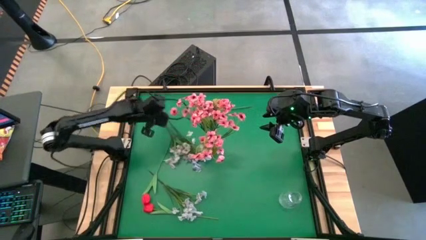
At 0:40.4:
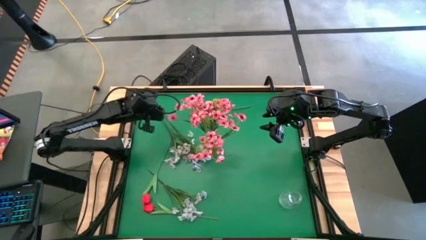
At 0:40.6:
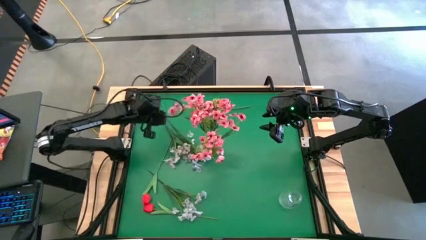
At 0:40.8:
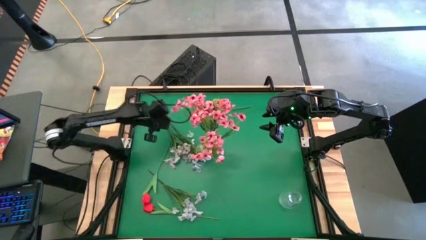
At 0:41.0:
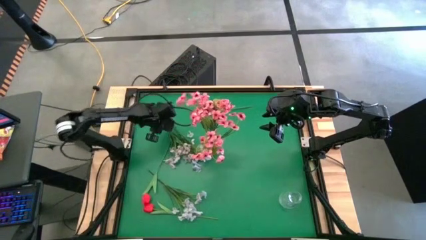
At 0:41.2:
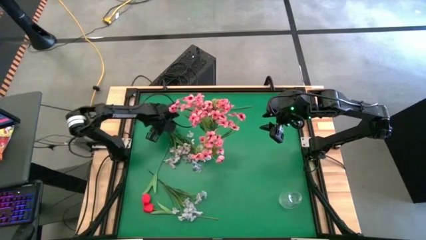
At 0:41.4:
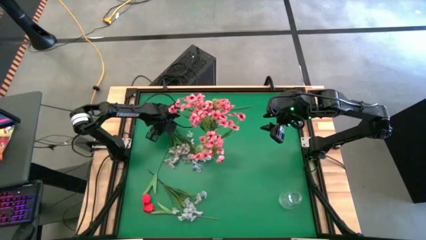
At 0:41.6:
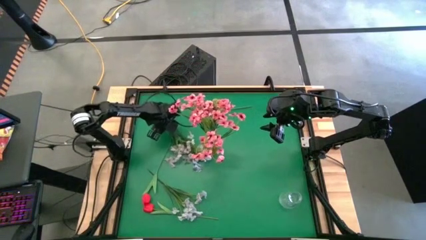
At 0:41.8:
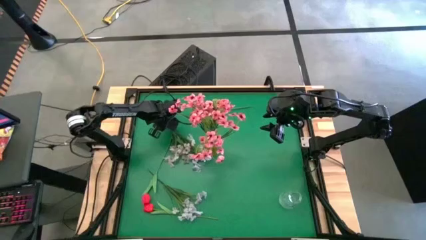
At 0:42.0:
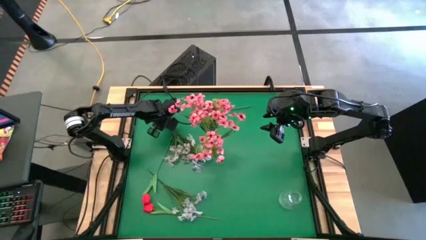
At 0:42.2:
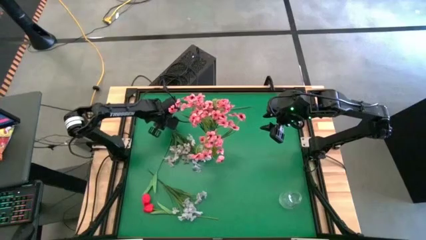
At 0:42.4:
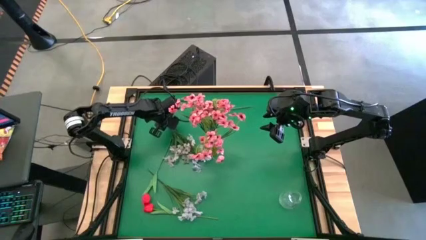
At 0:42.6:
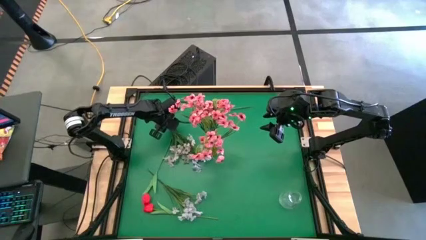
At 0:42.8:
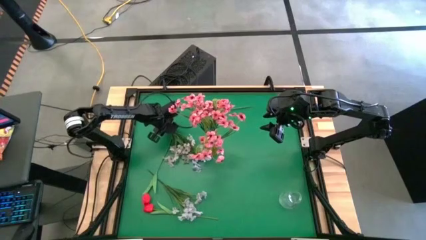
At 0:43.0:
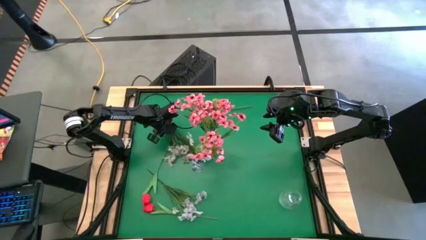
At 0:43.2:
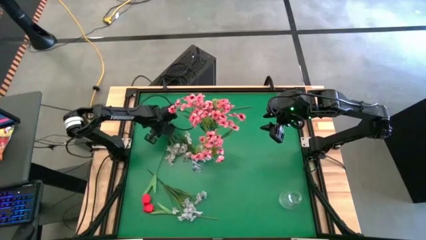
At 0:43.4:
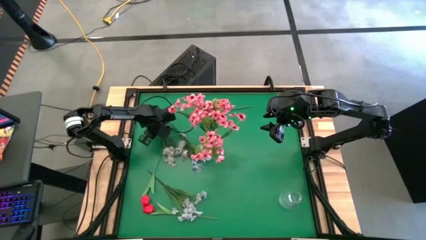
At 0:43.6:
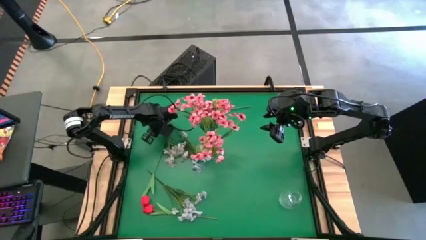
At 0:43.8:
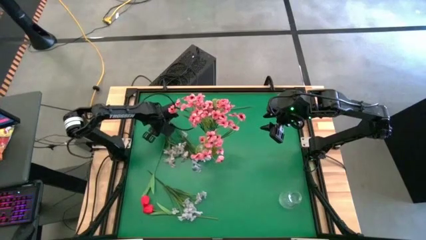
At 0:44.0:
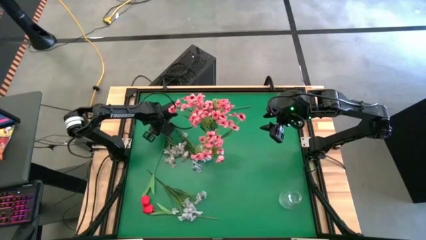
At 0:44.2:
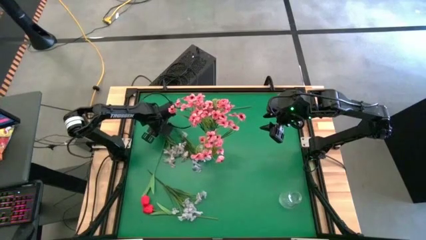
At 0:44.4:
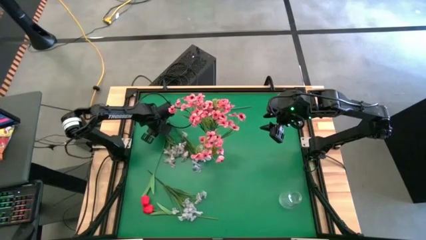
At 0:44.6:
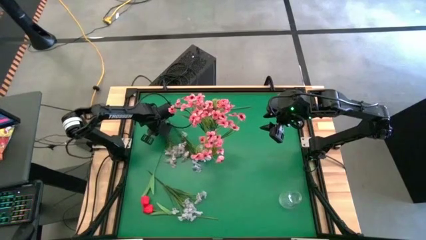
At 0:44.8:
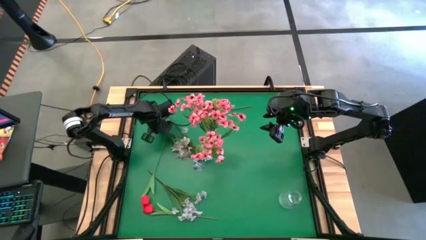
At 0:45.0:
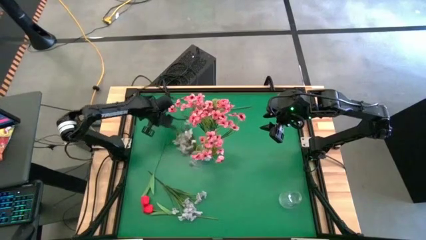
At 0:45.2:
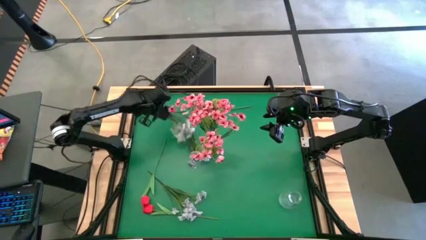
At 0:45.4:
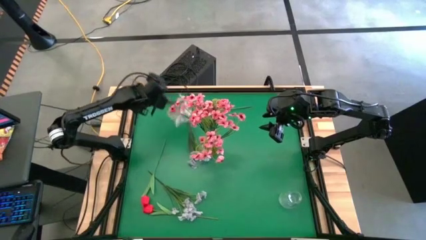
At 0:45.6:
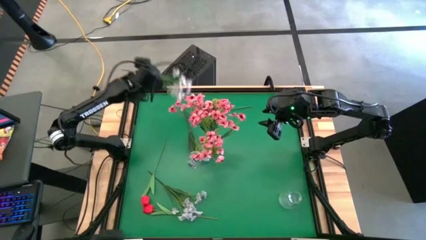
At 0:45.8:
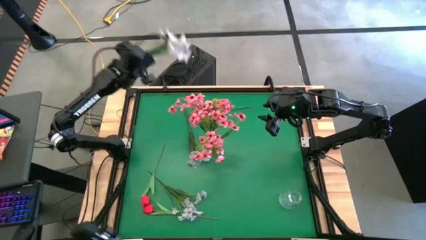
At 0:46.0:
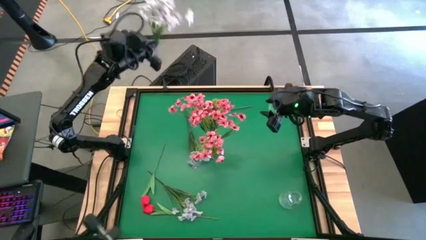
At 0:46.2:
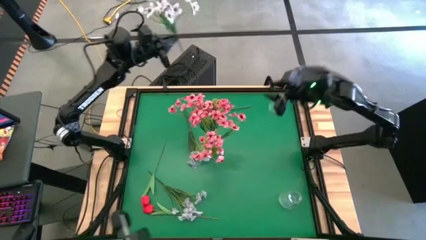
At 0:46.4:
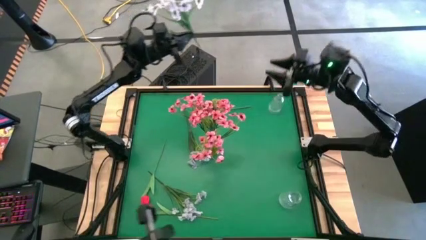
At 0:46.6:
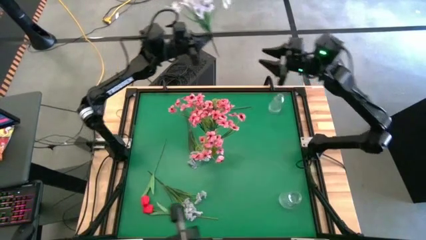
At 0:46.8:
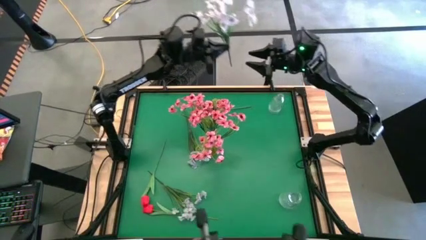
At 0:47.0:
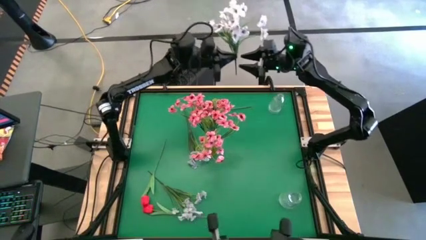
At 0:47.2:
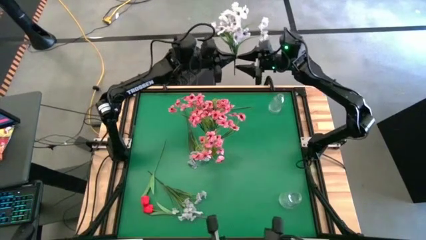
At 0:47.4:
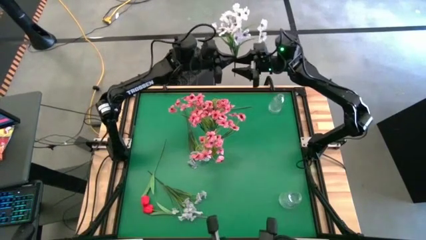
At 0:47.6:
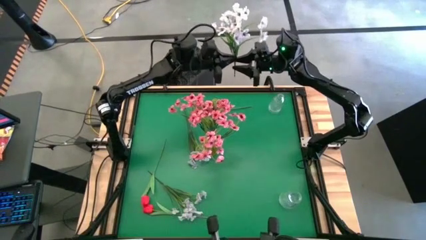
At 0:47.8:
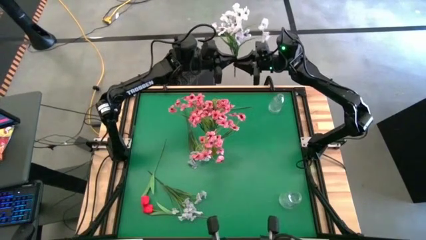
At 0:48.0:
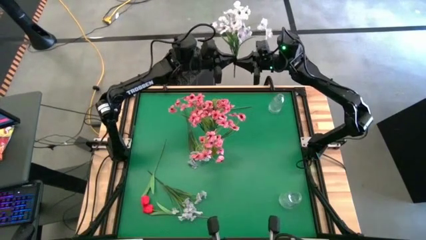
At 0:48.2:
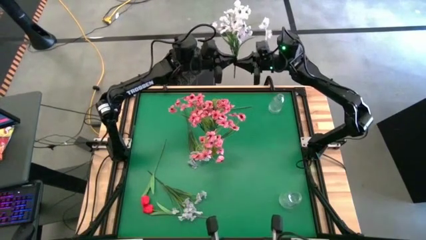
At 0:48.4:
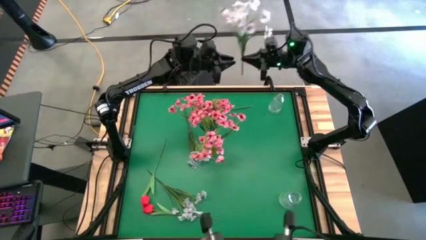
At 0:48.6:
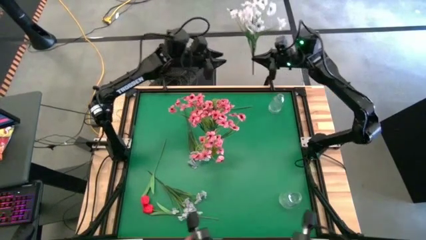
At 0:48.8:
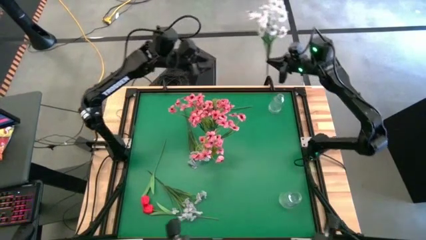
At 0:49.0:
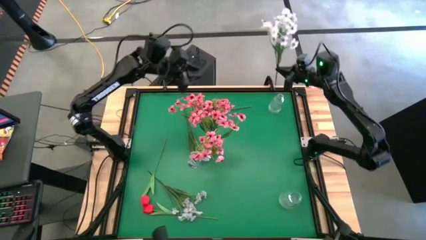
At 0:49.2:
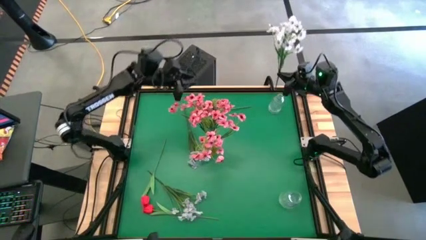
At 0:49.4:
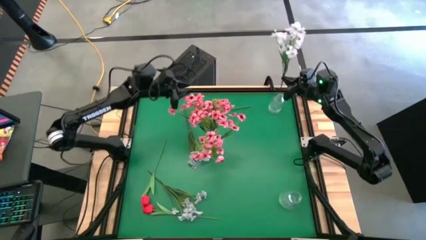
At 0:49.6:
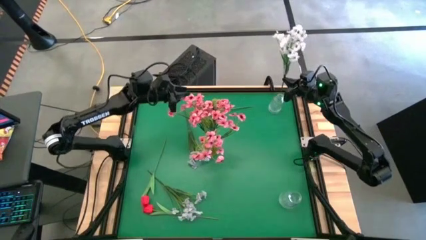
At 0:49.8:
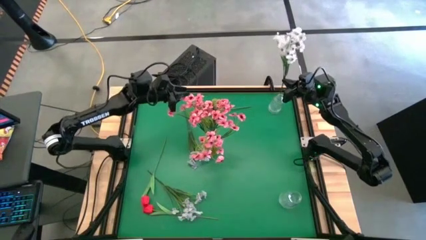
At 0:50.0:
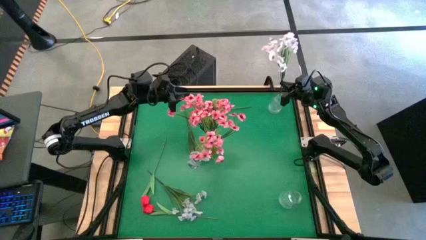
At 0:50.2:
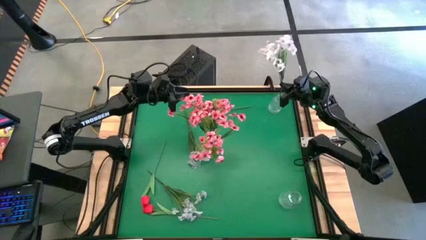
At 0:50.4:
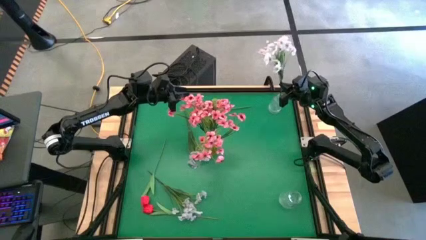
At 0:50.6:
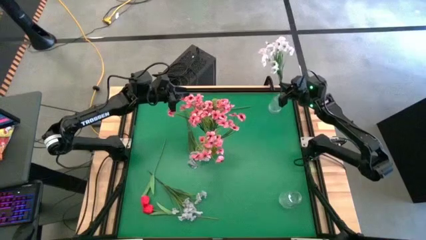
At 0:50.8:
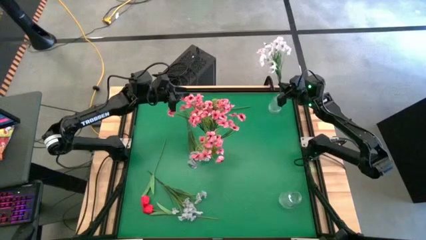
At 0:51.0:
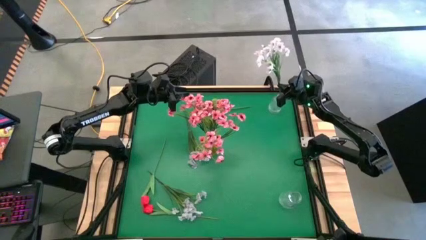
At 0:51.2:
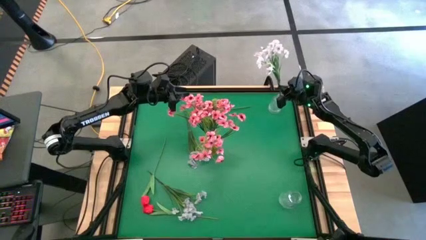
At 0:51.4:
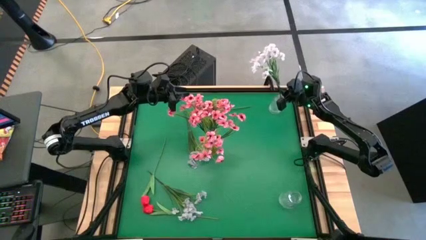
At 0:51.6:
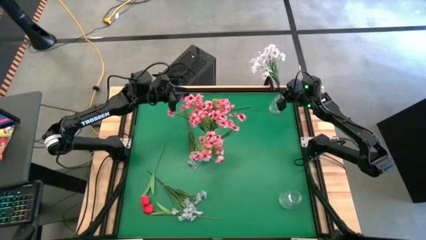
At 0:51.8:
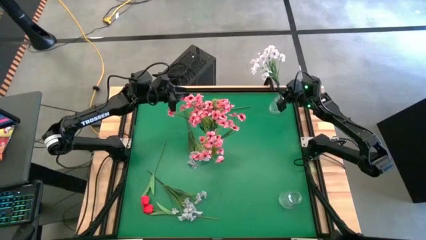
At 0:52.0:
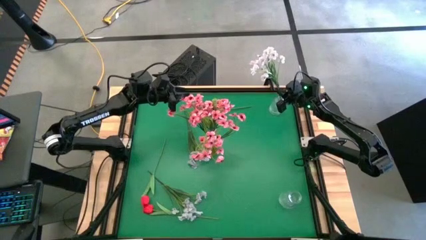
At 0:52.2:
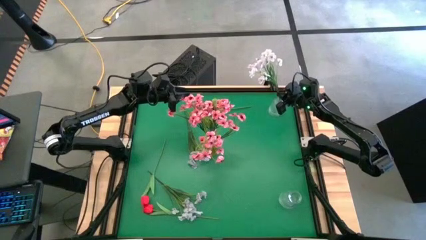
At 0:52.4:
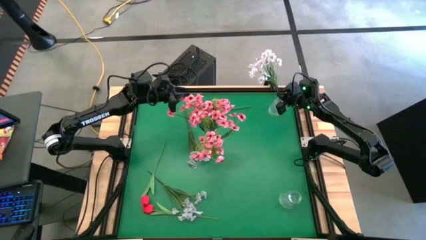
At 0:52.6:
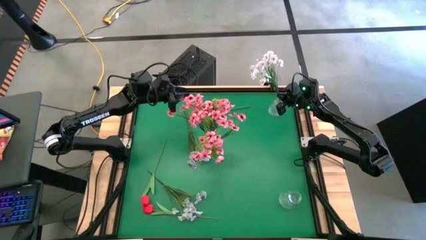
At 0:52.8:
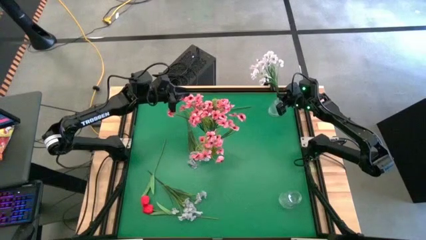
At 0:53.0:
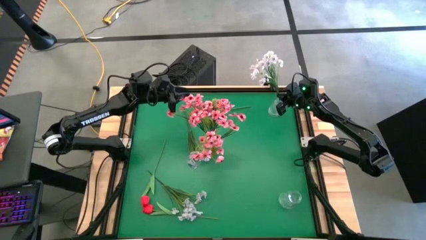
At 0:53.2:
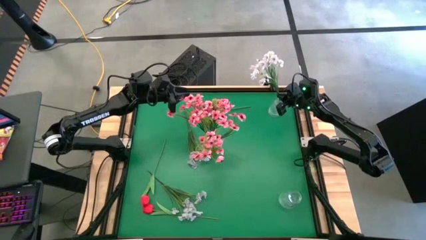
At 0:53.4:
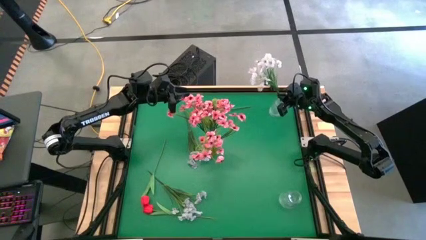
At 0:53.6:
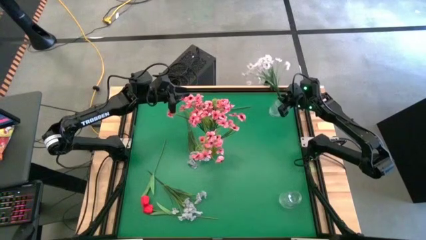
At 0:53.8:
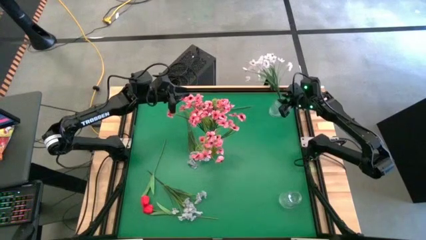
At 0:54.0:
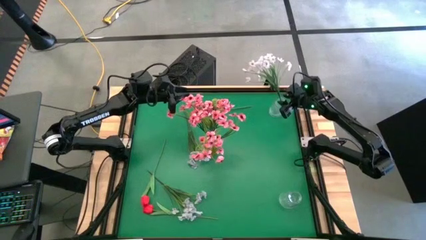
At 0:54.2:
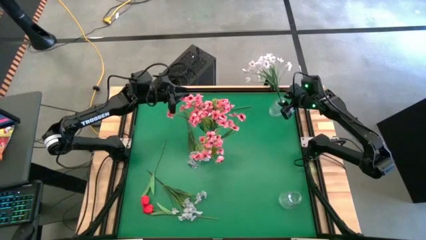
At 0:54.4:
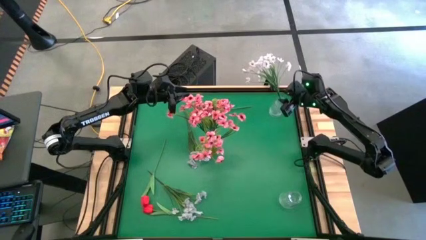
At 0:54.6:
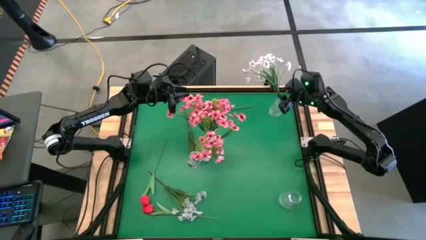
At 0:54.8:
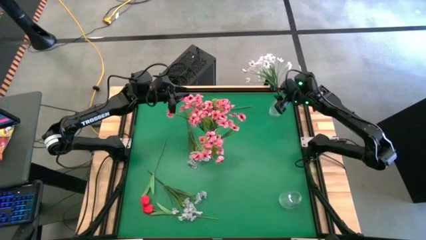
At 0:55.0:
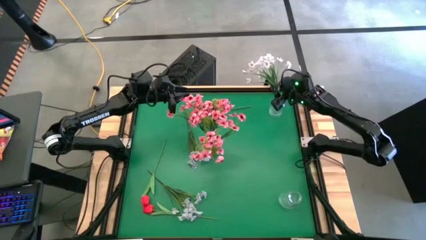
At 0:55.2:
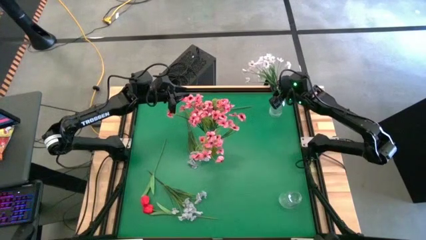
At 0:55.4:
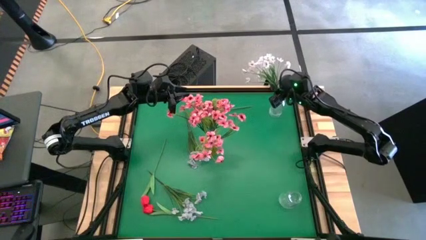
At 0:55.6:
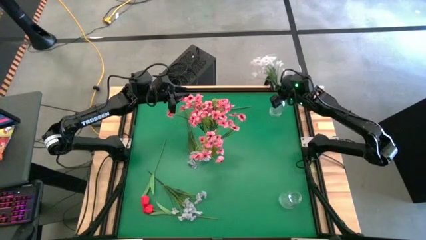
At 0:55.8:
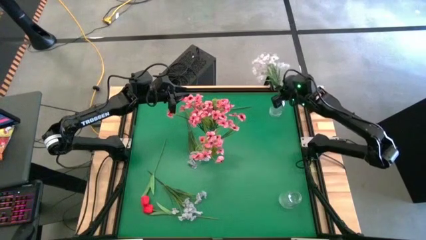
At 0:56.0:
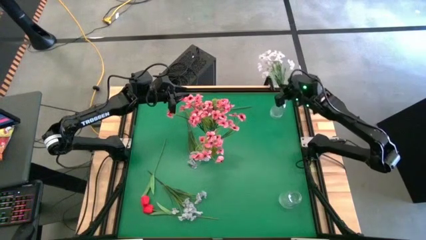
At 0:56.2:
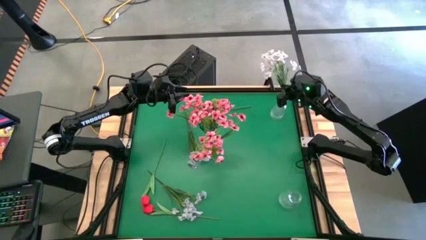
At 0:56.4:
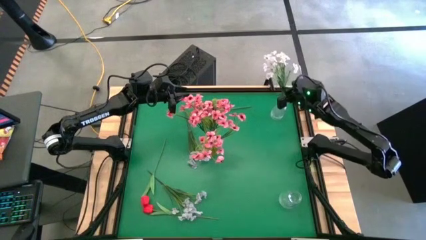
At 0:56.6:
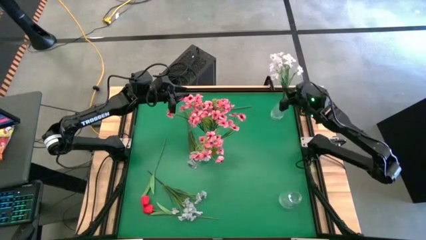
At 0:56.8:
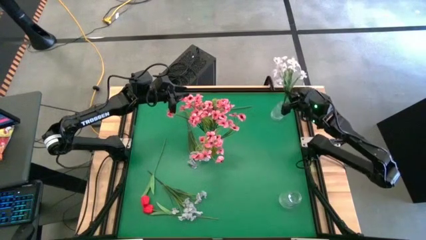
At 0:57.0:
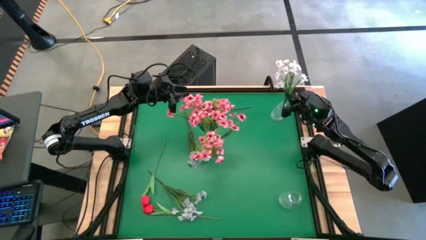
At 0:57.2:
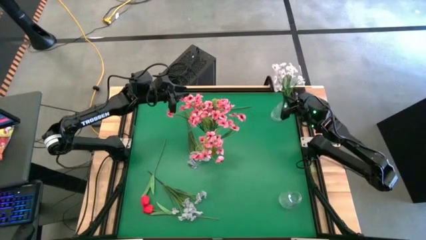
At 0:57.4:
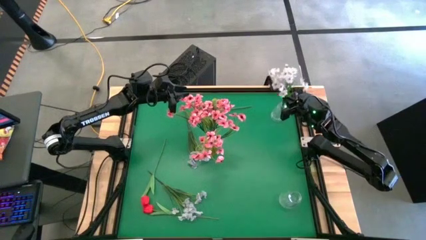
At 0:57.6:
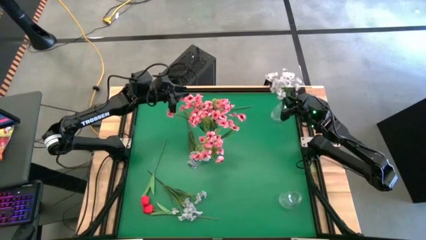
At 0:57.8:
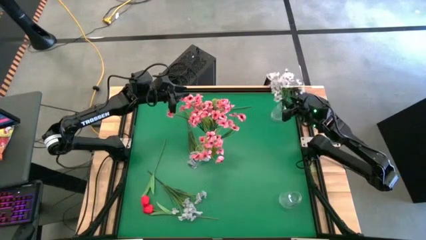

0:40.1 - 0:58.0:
Task: Sort flowers into vase by color
Put the white flowers into the top transparent vase
